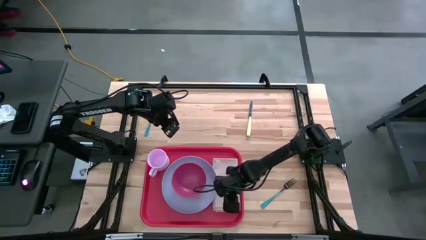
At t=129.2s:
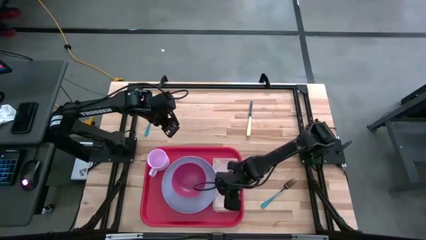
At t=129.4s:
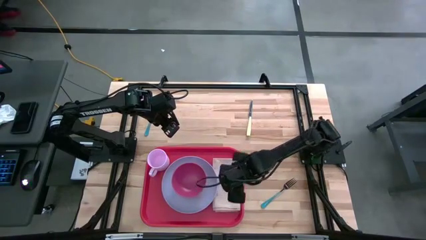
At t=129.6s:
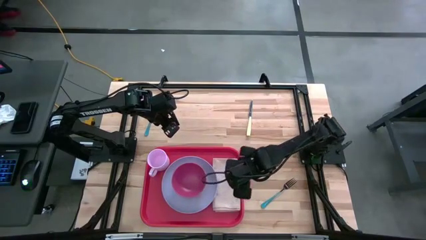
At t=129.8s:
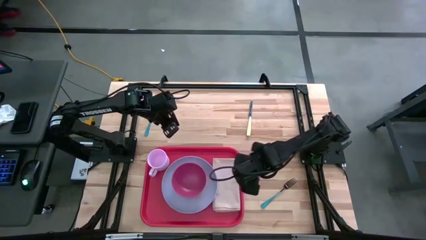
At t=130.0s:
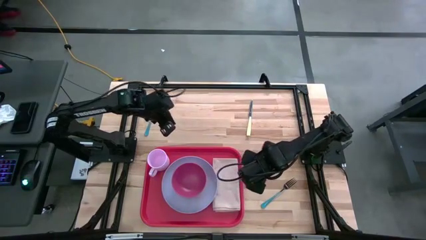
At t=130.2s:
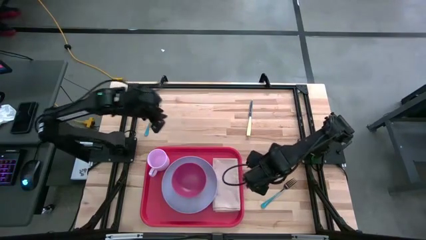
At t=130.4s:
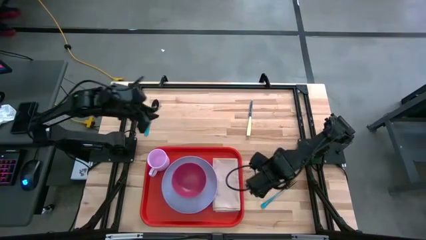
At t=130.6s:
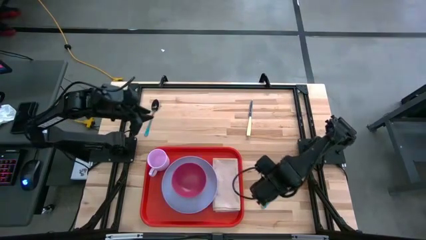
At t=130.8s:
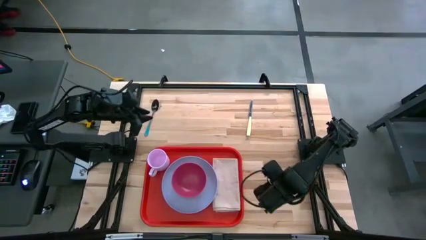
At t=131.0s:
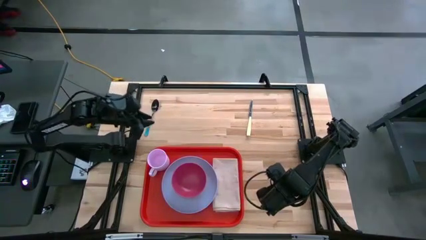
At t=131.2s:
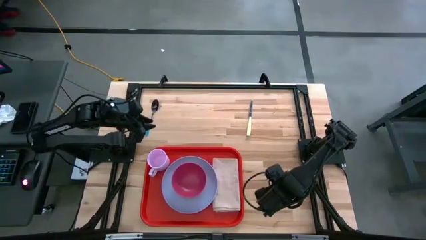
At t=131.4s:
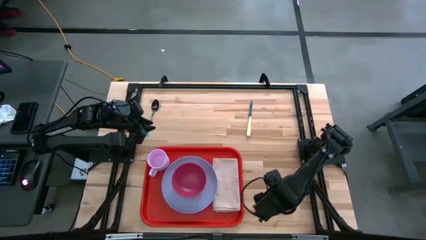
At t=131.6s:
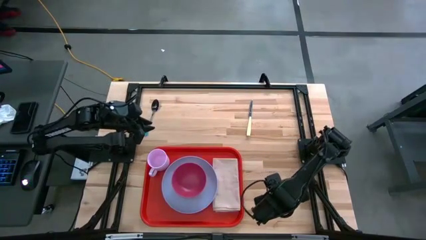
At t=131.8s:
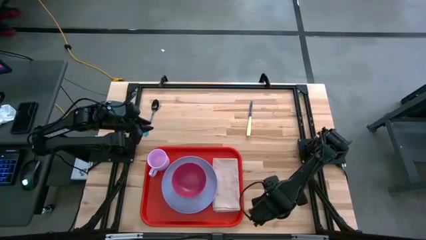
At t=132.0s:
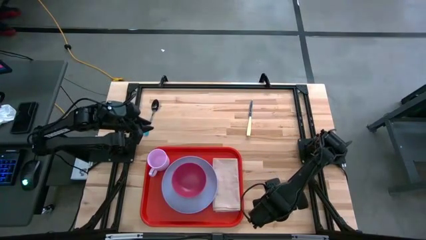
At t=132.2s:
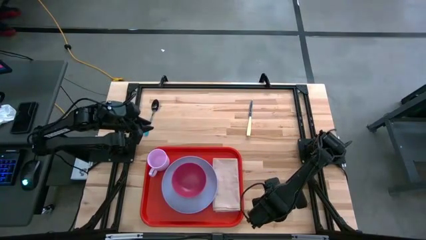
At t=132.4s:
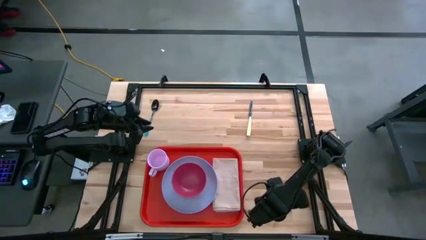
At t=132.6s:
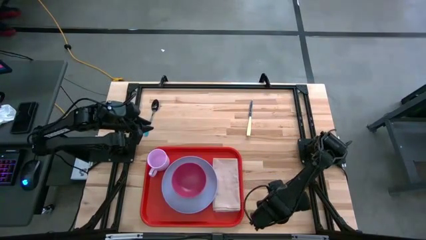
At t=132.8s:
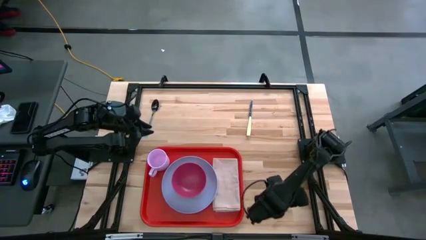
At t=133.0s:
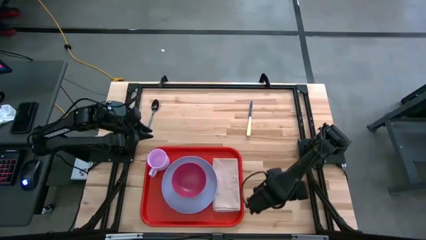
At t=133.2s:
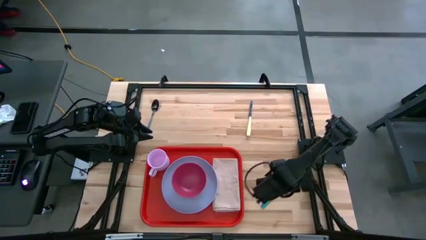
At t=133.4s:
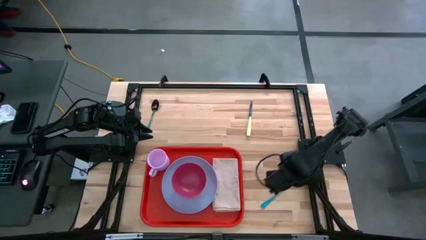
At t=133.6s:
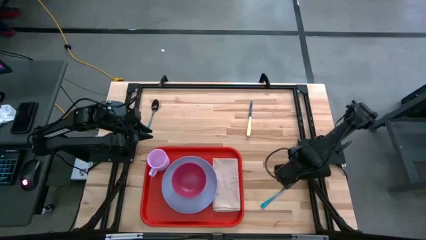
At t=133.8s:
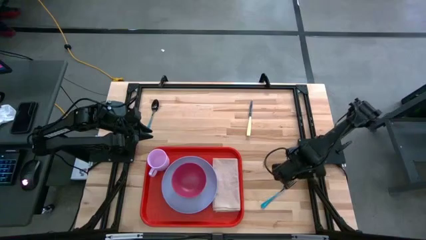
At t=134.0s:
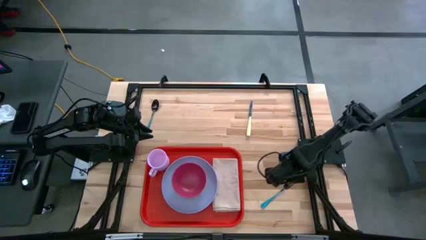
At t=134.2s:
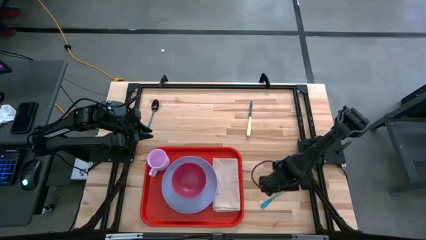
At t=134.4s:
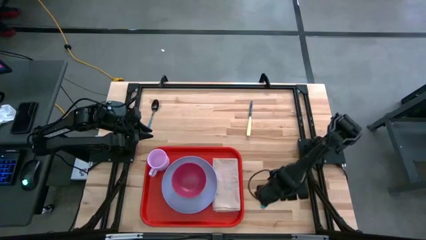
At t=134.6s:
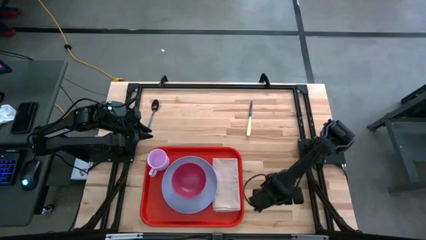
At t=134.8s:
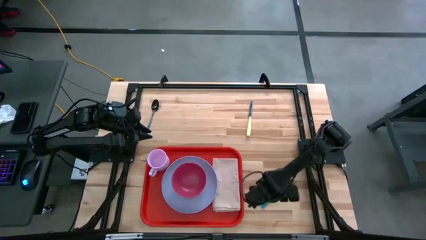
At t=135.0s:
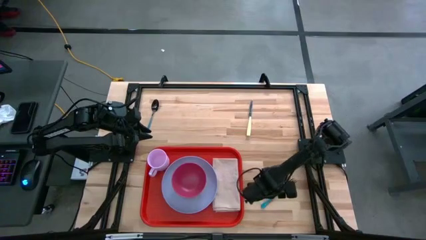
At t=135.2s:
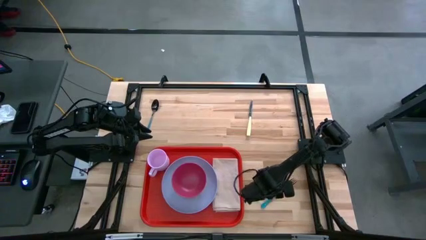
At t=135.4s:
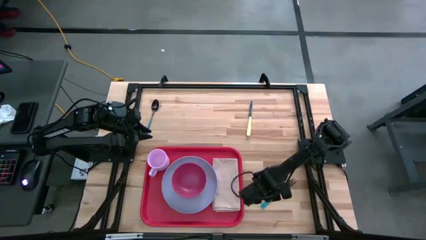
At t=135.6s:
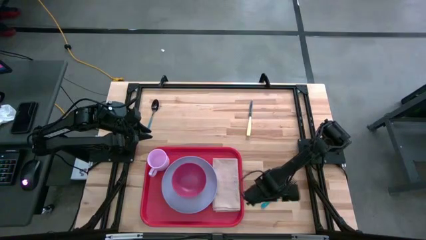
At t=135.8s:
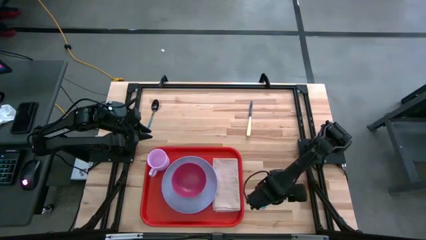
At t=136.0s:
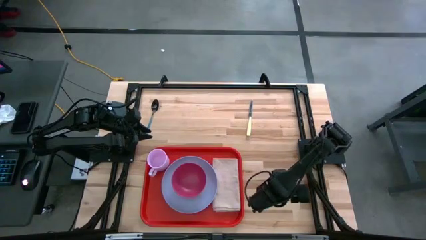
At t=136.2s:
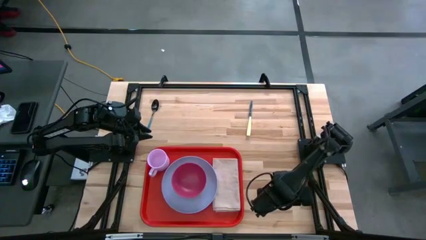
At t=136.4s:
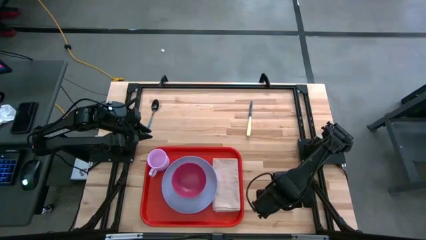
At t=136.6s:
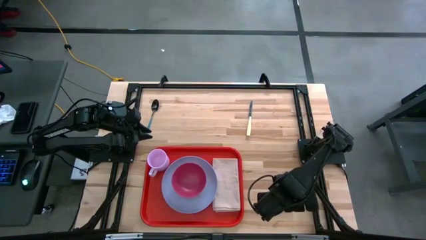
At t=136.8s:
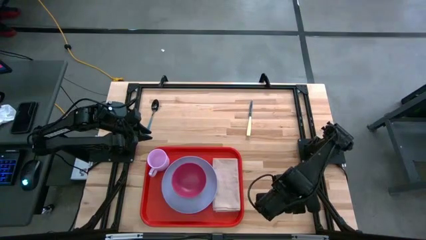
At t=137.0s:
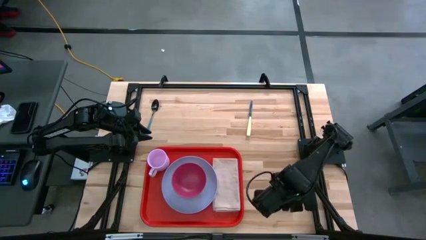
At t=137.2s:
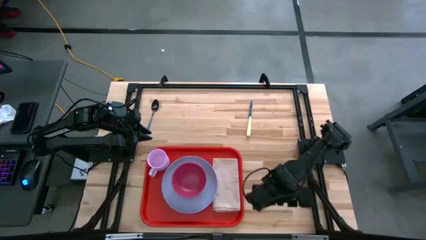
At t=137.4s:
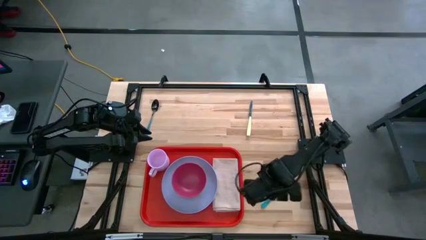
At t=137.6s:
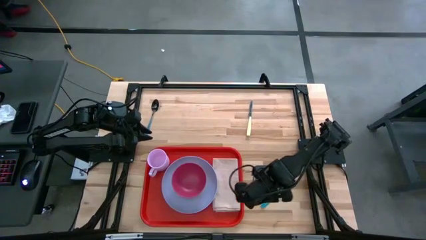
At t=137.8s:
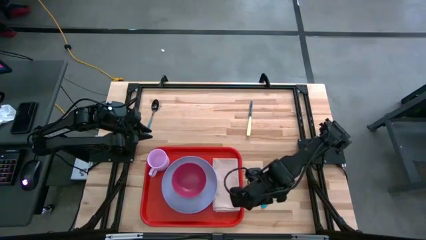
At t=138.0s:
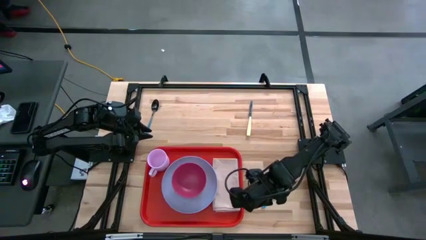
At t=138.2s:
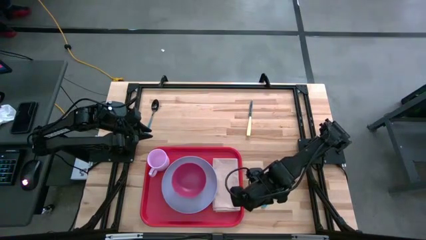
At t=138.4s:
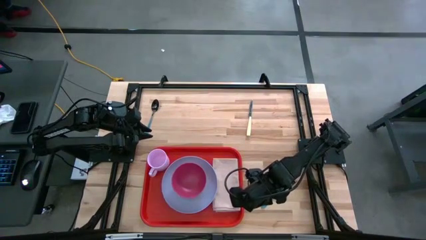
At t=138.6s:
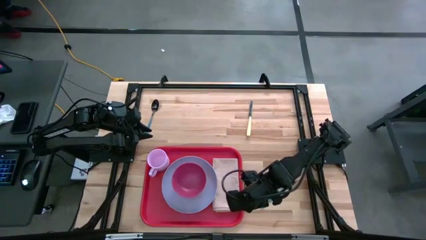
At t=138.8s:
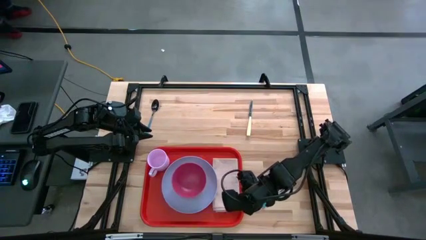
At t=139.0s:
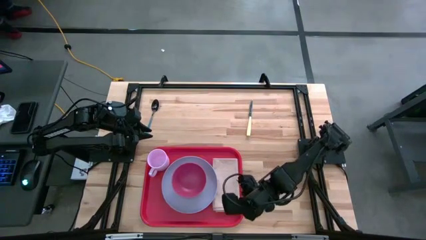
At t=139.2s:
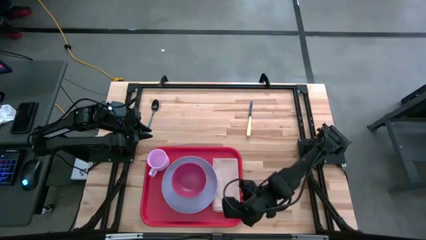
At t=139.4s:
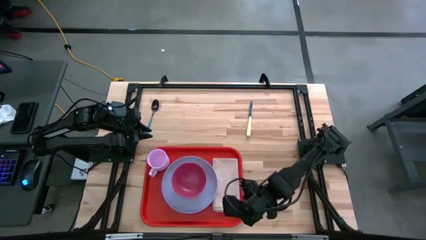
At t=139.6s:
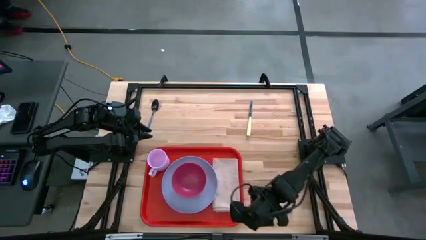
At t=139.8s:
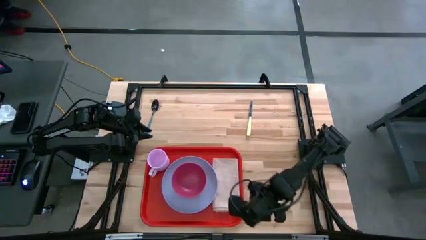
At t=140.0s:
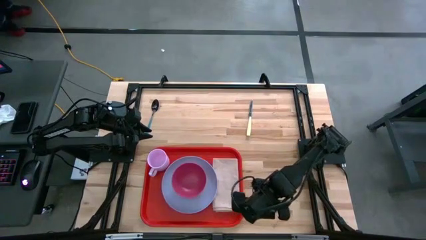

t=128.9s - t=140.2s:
Task: Set up tray
Put the blue fork on the peach napkin on the orange serving tray

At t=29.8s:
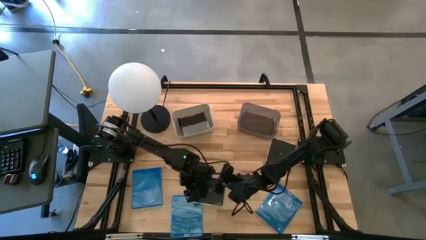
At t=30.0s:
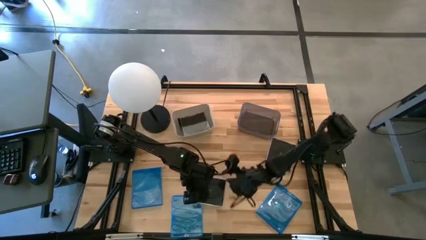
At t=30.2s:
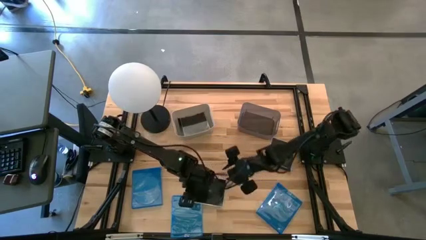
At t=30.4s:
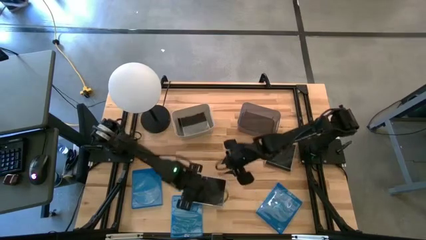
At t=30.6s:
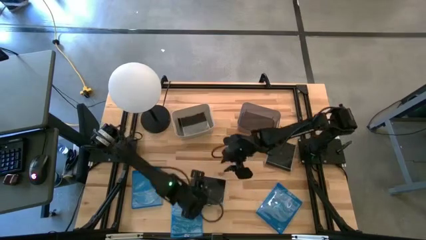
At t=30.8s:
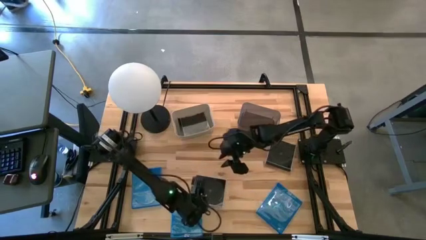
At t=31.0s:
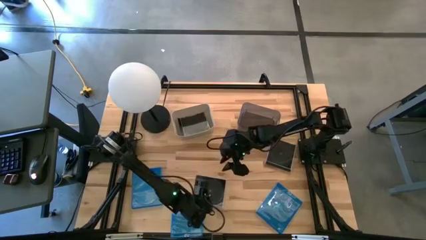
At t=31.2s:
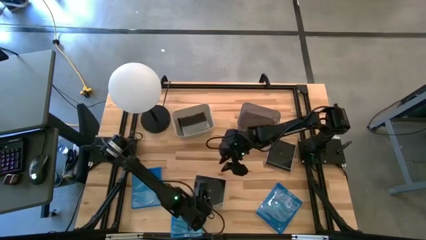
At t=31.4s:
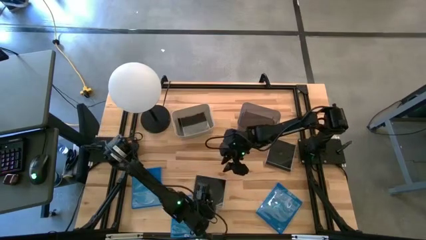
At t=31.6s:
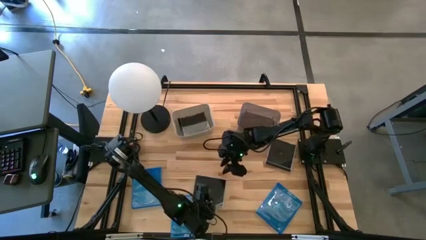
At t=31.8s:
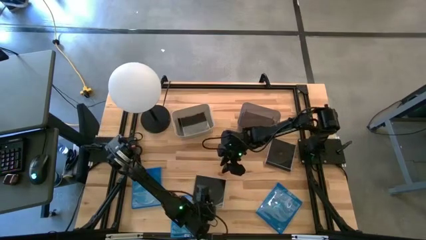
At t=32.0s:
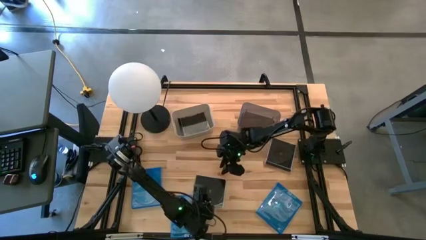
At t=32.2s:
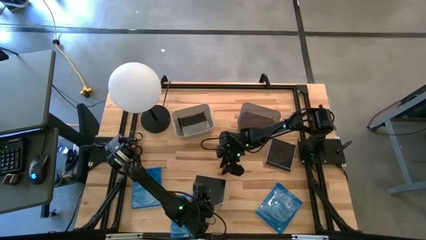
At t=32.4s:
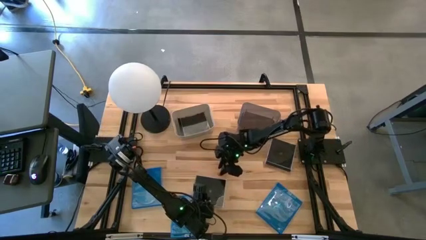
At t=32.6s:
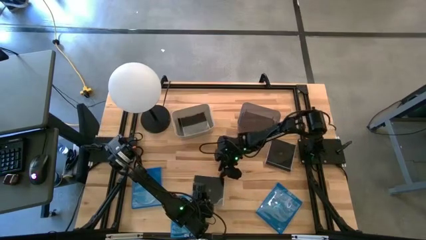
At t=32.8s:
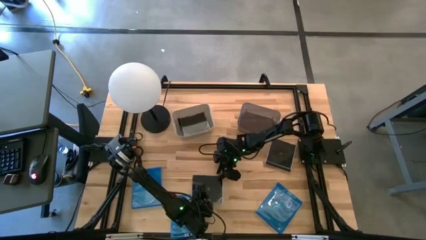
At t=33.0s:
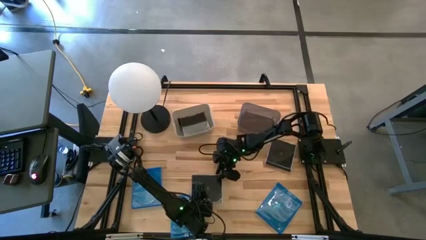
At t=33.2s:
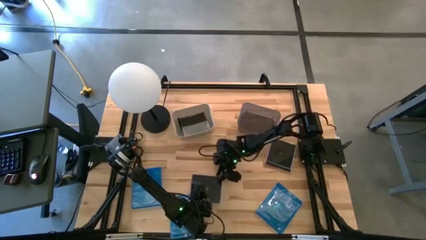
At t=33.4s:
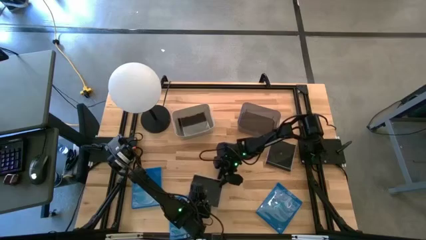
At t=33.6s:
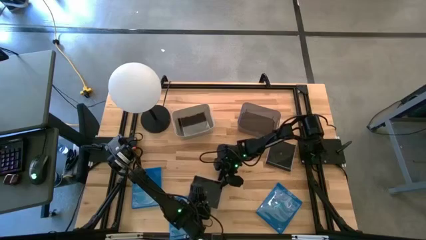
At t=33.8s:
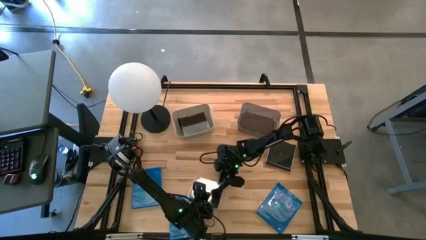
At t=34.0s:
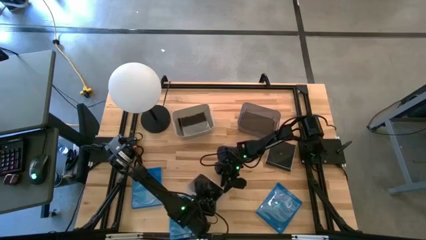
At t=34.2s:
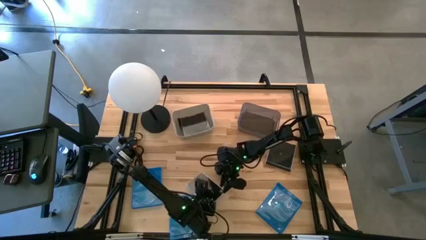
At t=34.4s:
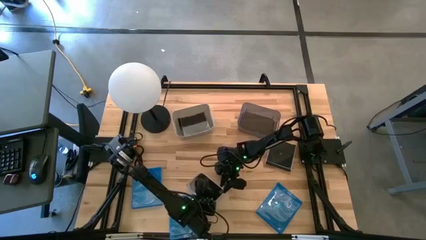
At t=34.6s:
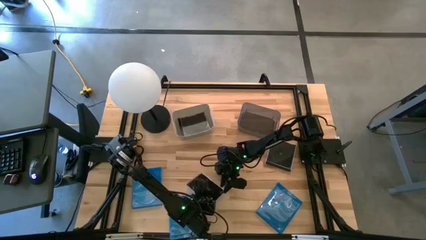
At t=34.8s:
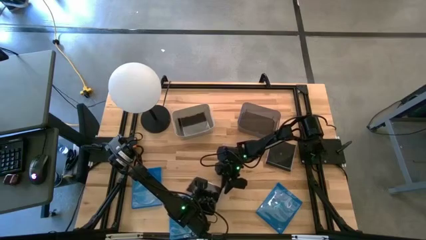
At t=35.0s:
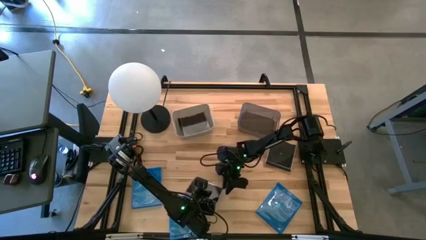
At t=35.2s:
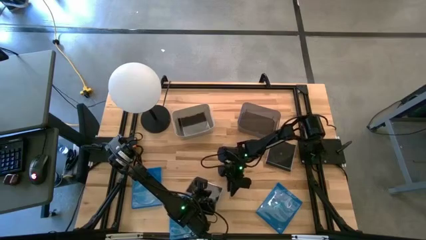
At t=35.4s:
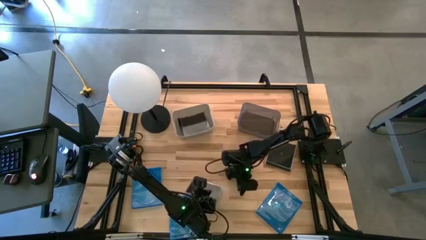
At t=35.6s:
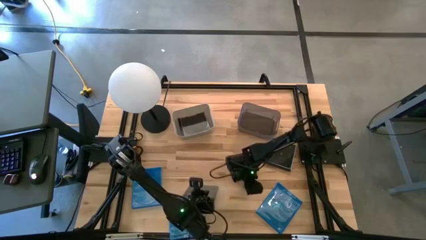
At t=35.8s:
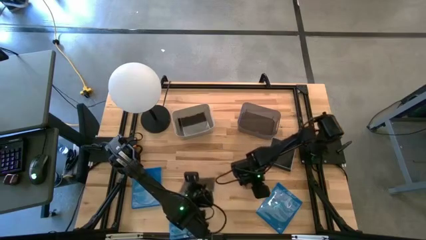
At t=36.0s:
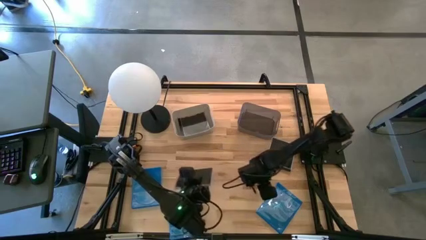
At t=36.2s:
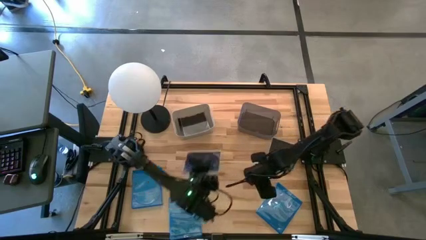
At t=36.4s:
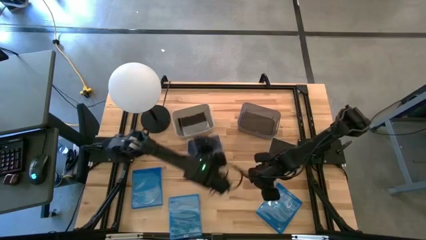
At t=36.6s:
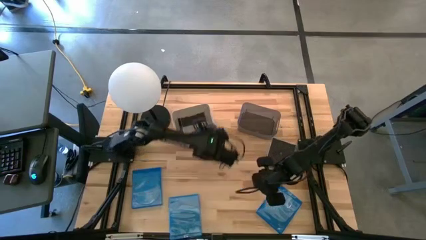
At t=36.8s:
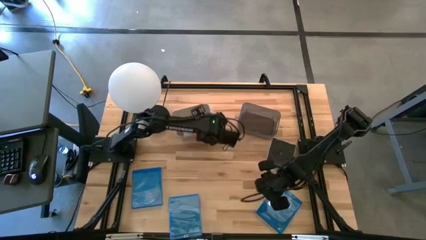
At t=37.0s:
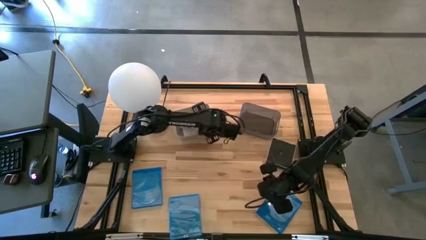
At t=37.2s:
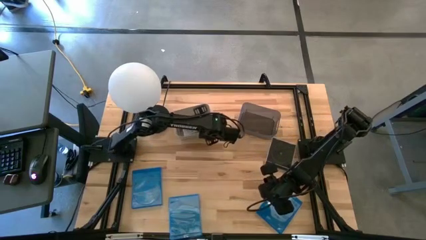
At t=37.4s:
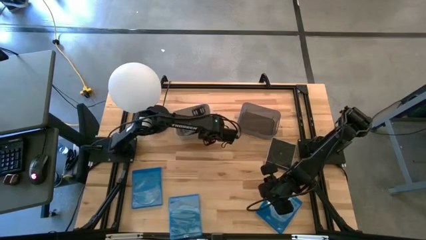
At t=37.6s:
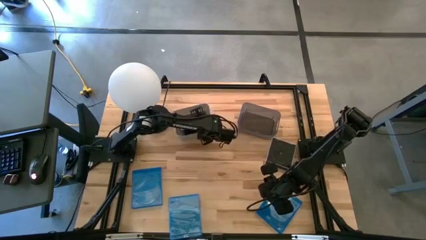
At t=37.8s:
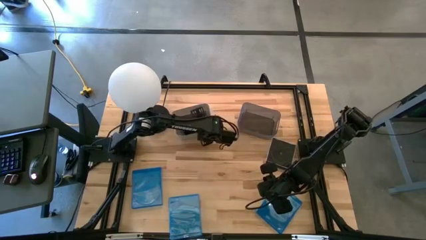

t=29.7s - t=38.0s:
Task: Pick & place jewel cases by type
Put the bottom black CD case into the gray bin
